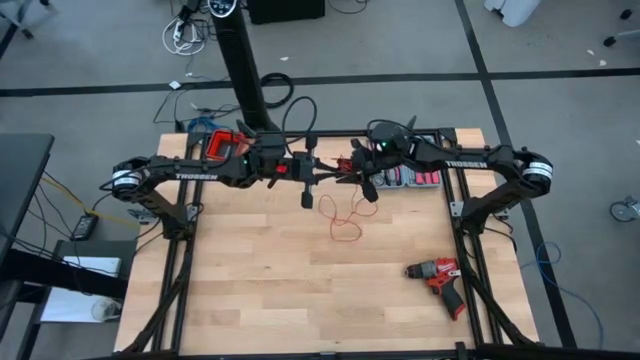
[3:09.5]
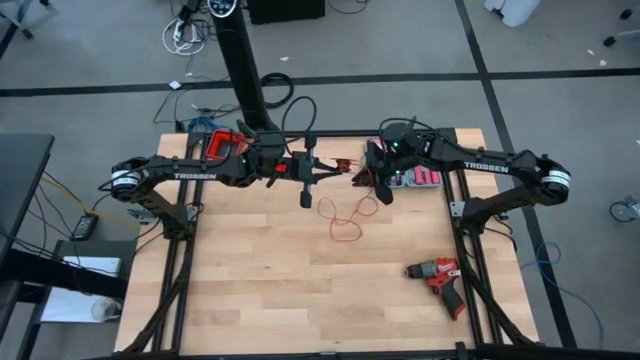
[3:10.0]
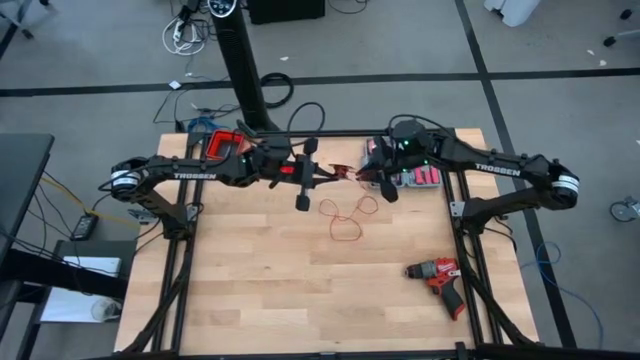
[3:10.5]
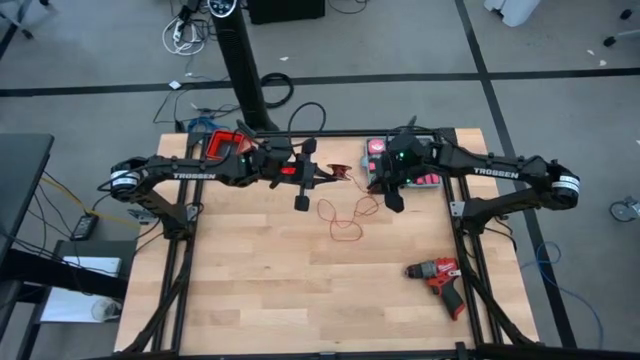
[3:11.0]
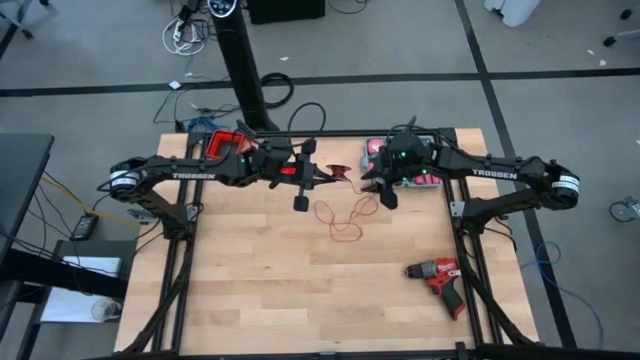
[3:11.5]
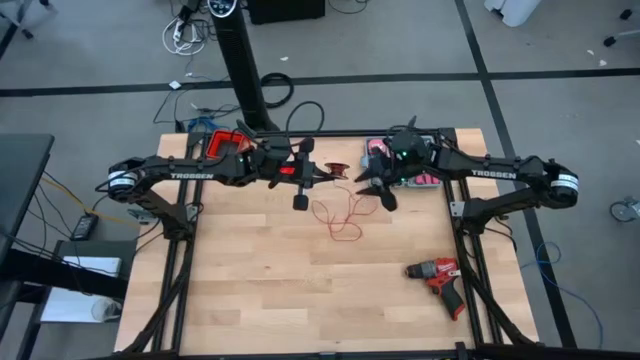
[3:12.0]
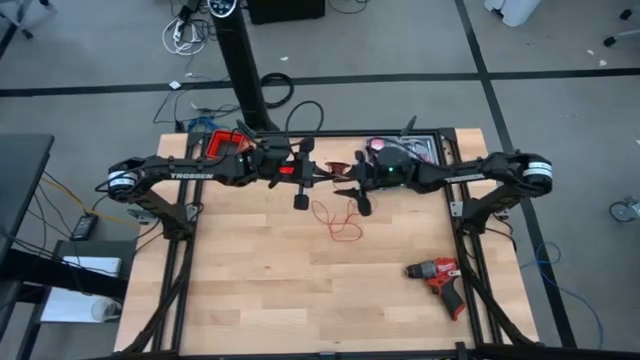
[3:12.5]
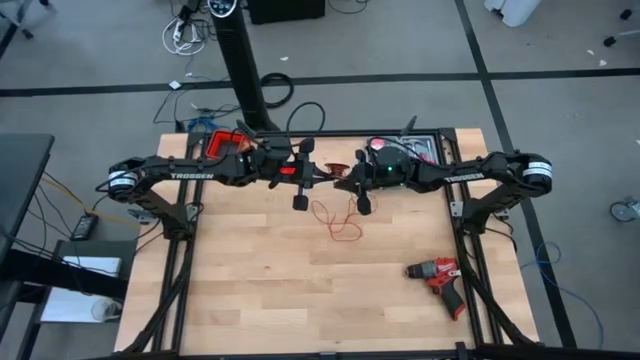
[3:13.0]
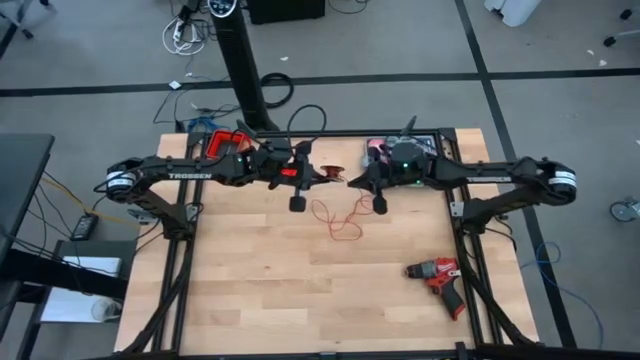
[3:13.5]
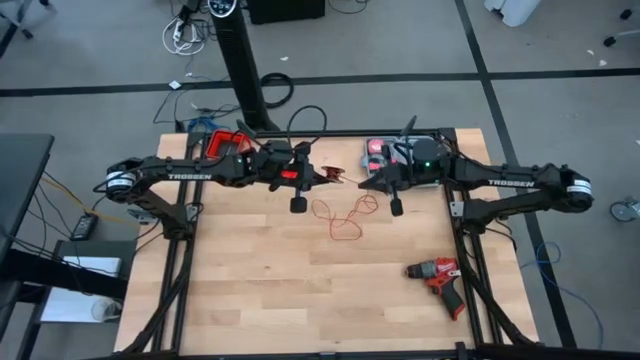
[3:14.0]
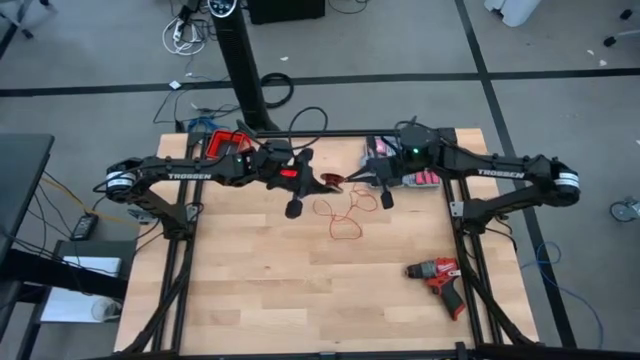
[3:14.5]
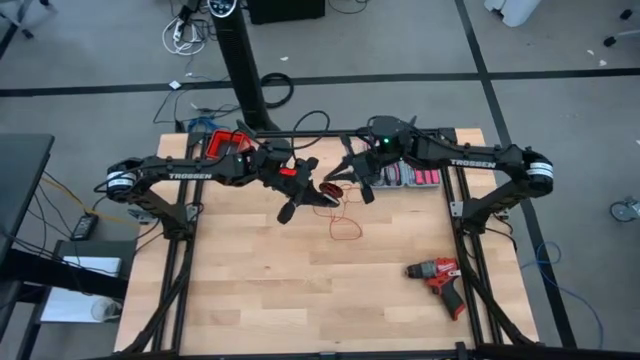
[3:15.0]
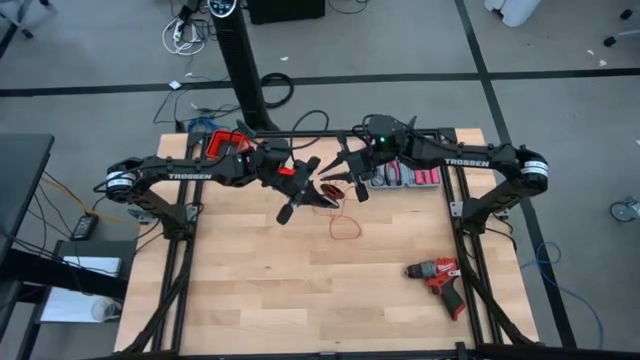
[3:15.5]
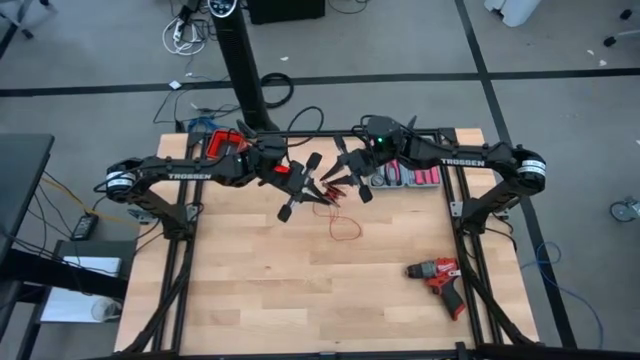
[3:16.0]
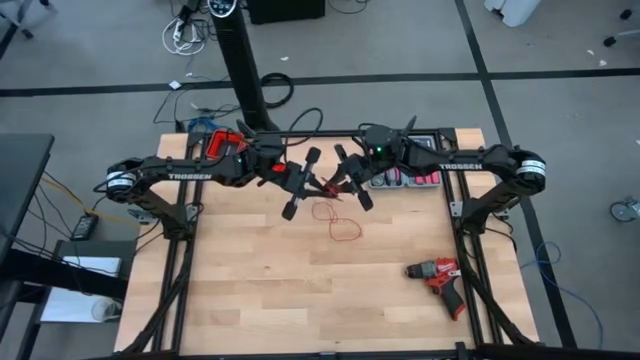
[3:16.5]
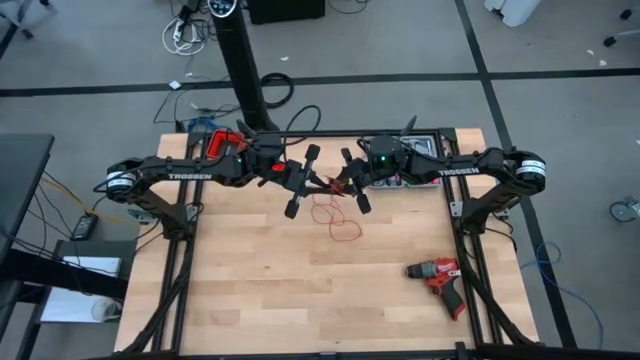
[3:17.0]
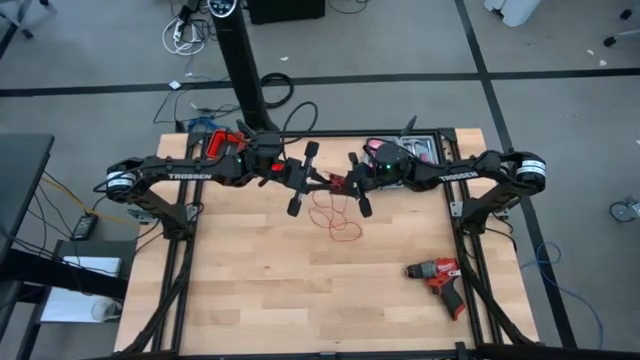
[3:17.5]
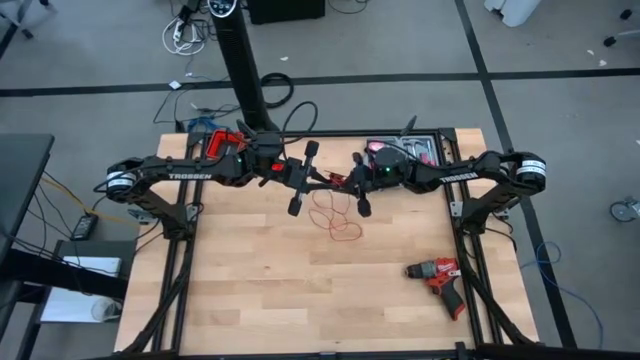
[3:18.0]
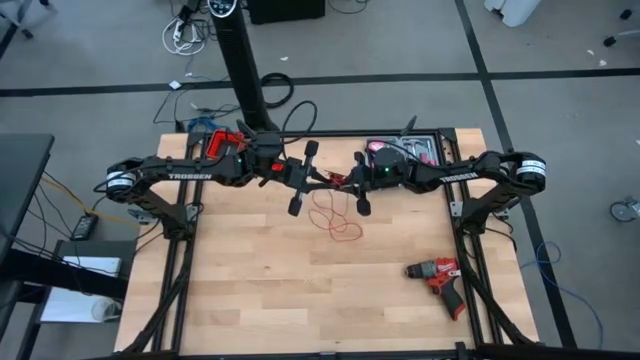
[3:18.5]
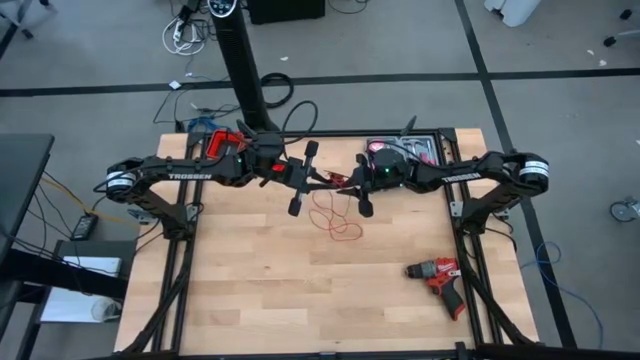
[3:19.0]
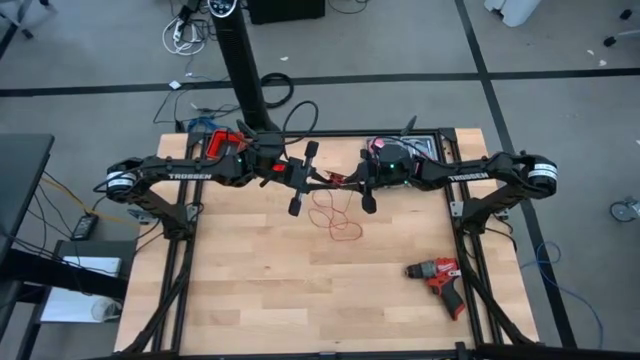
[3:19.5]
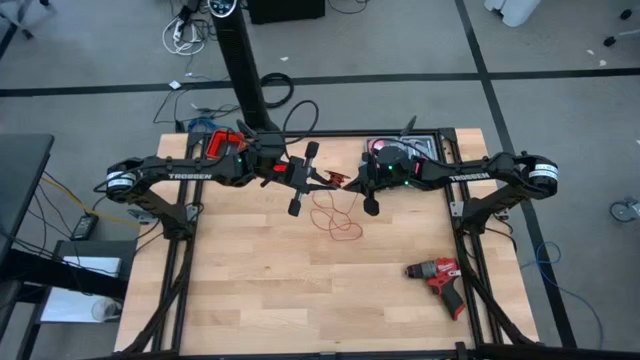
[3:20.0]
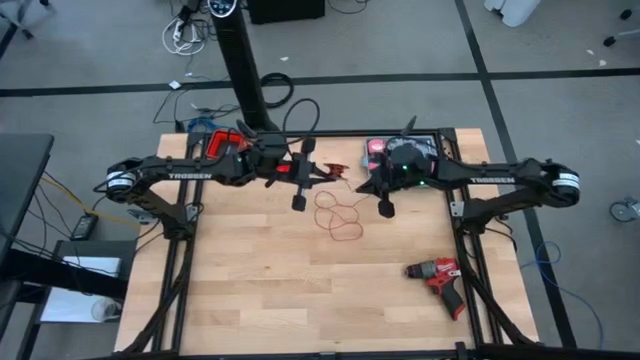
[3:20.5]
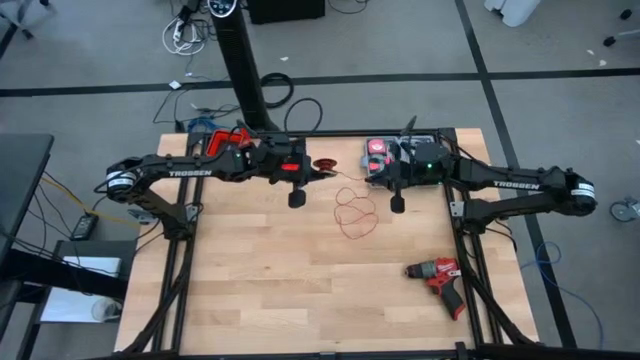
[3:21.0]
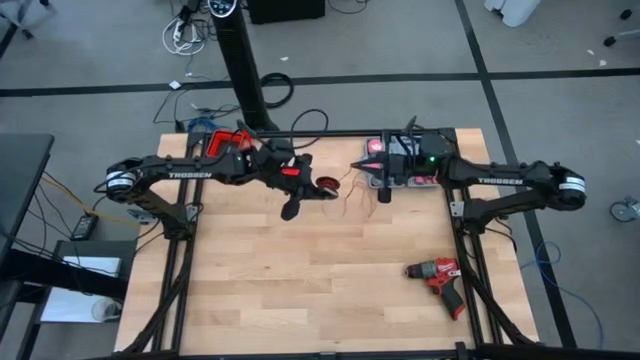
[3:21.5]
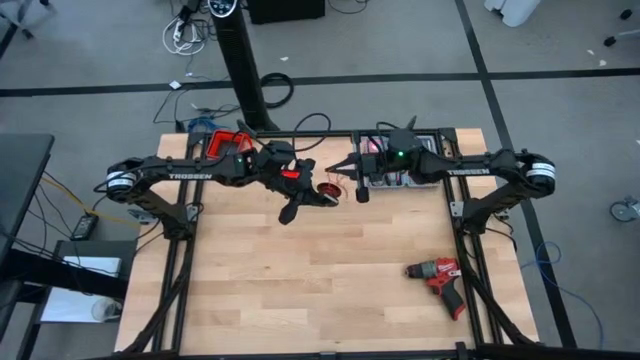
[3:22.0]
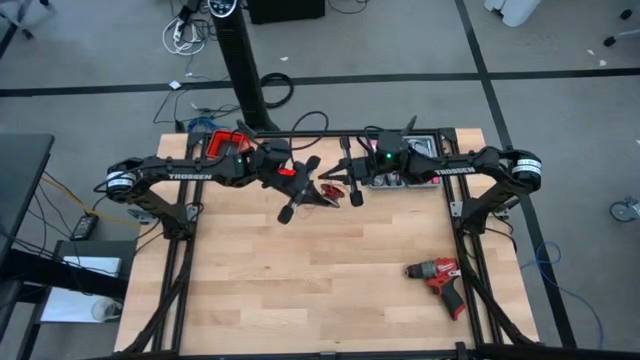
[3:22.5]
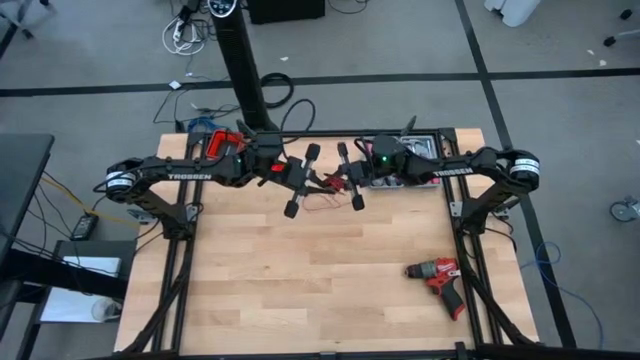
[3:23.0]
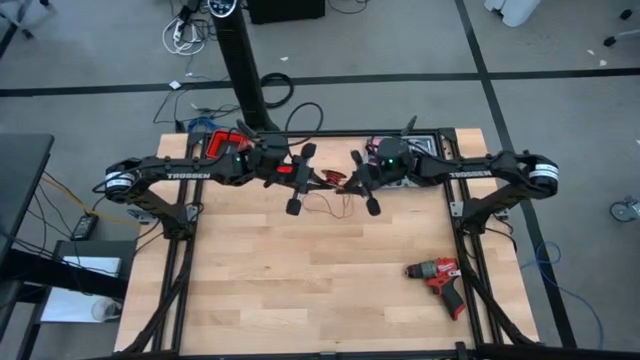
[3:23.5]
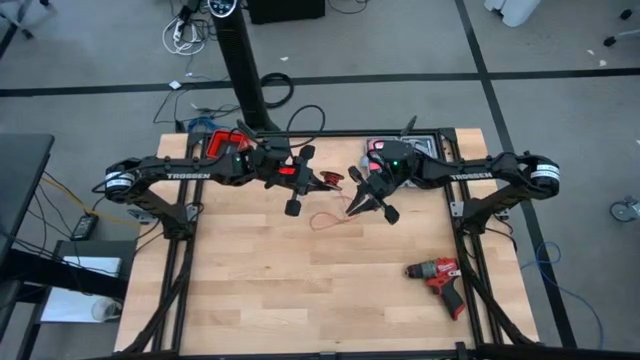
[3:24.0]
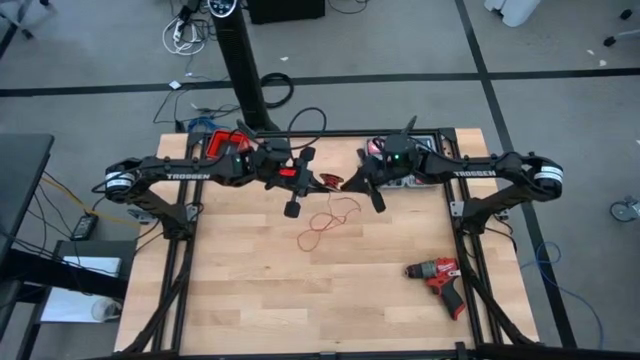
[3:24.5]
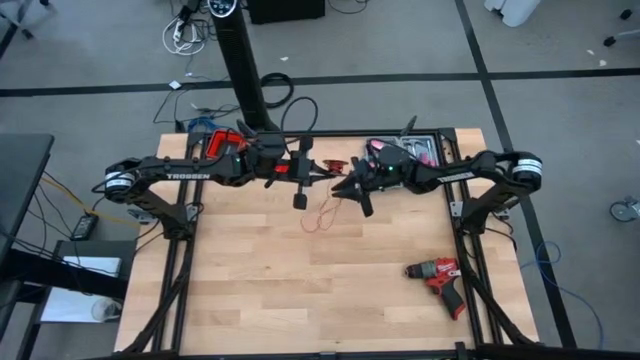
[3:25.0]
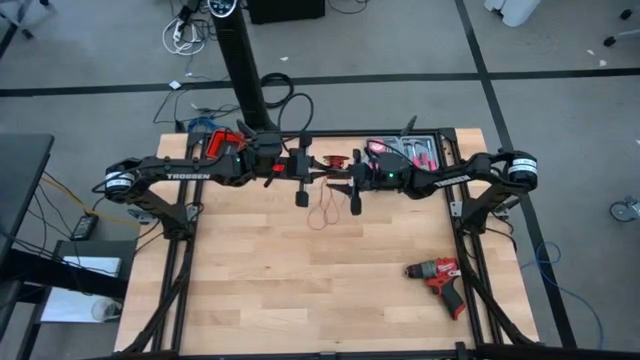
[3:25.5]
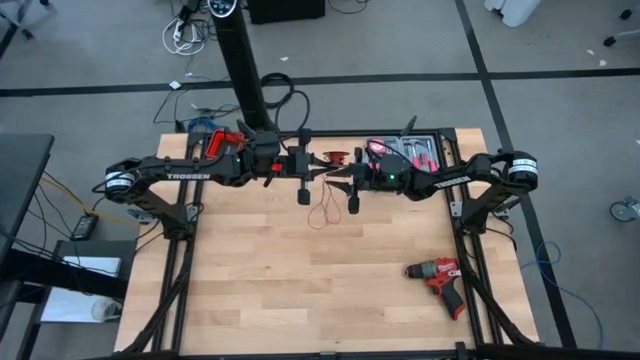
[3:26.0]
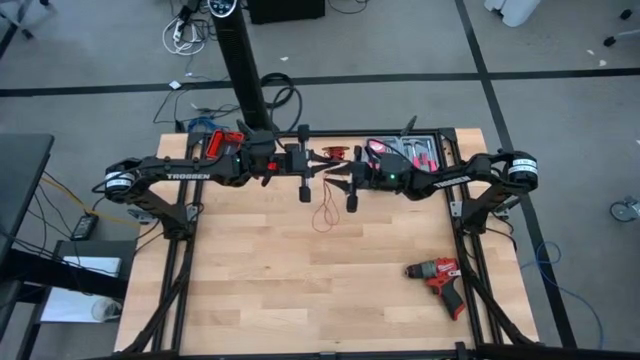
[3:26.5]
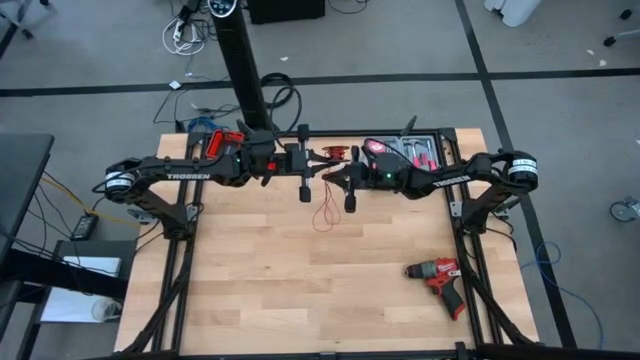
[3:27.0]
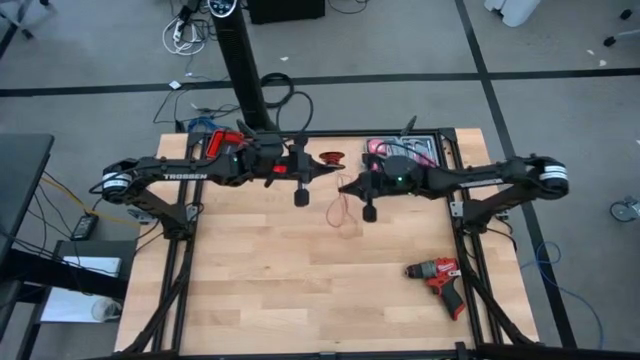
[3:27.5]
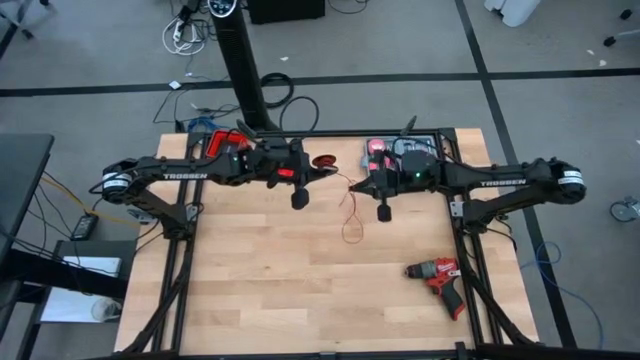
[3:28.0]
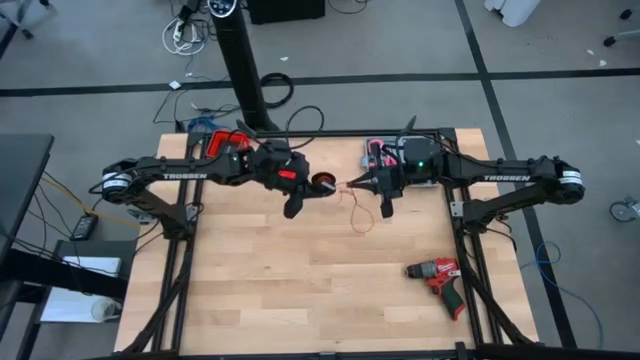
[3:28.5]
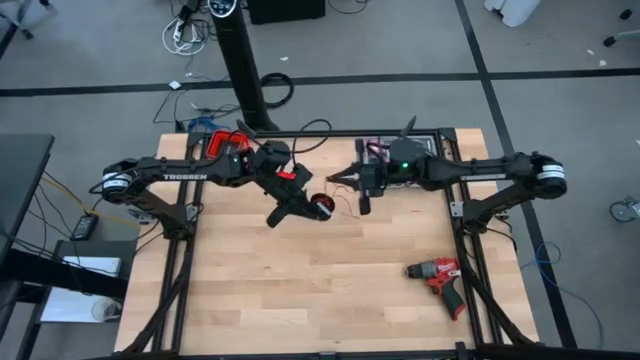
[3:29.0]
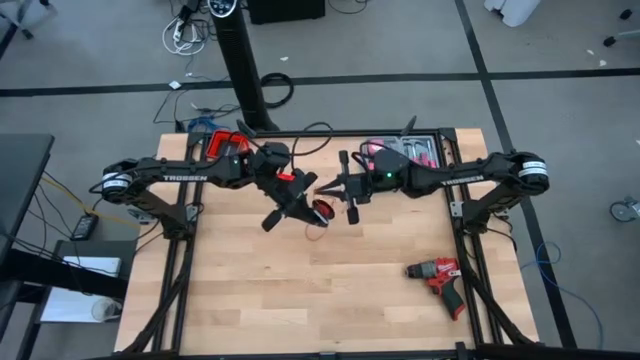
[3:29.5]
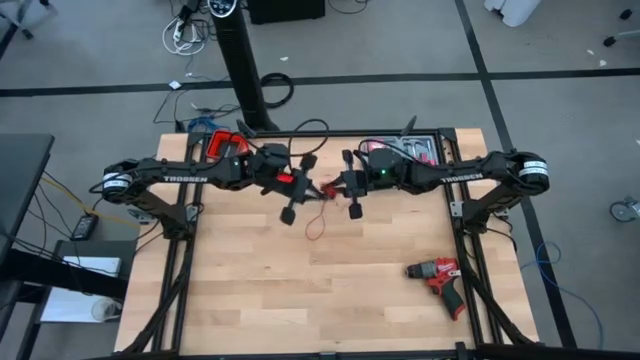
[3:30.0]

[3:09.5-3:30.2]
Task: Coil cords
Coil the red wire onto the black spool
